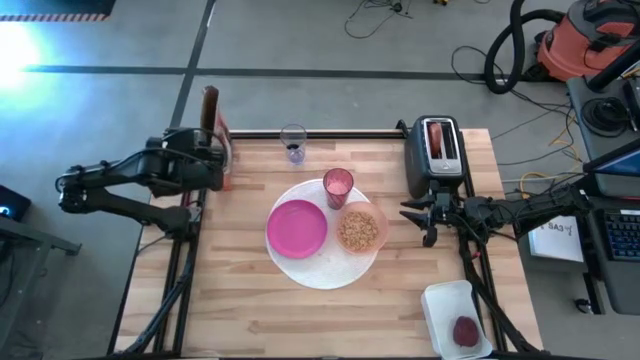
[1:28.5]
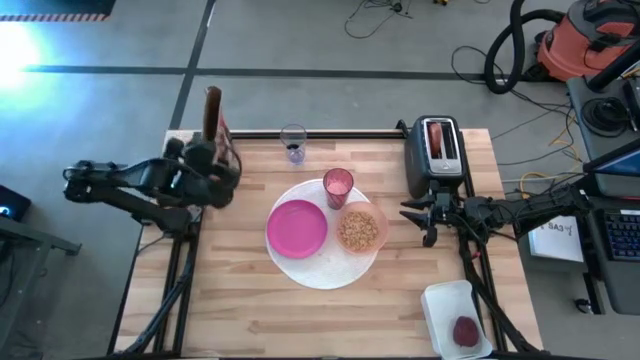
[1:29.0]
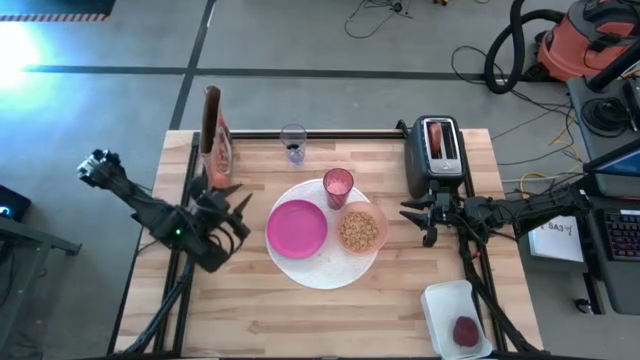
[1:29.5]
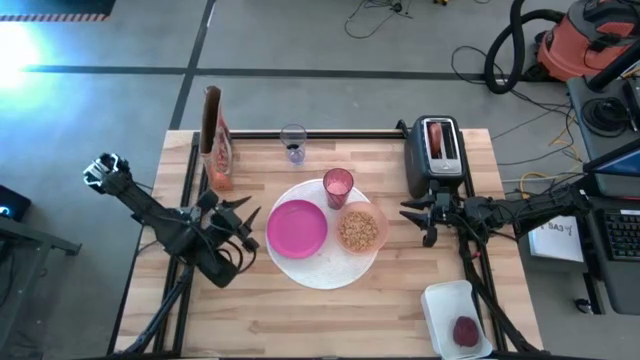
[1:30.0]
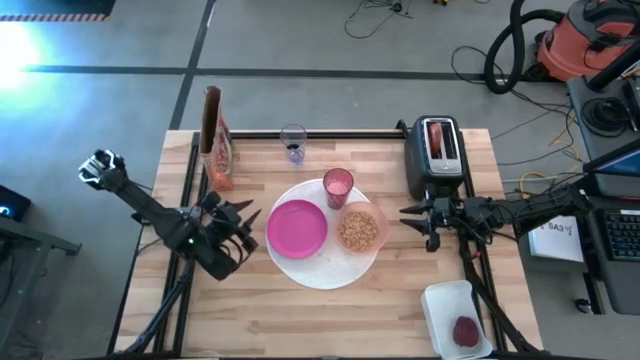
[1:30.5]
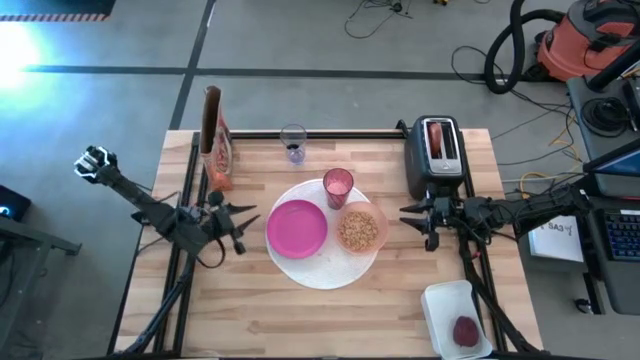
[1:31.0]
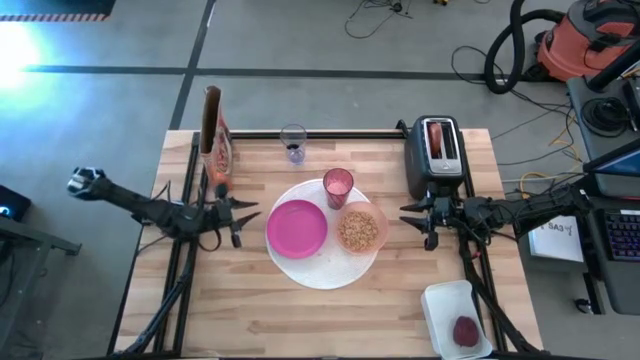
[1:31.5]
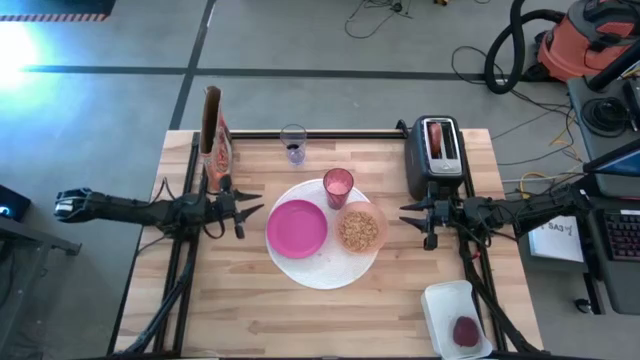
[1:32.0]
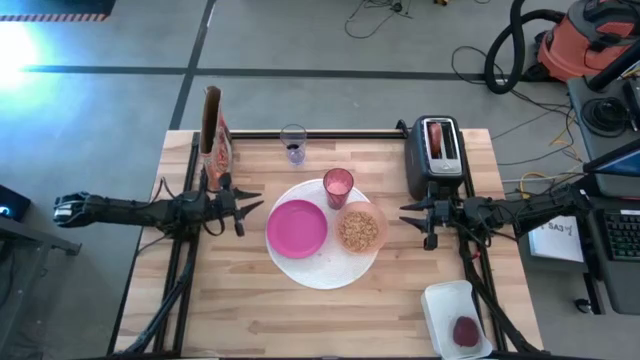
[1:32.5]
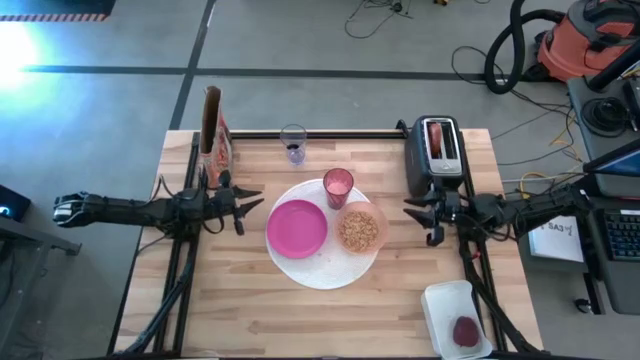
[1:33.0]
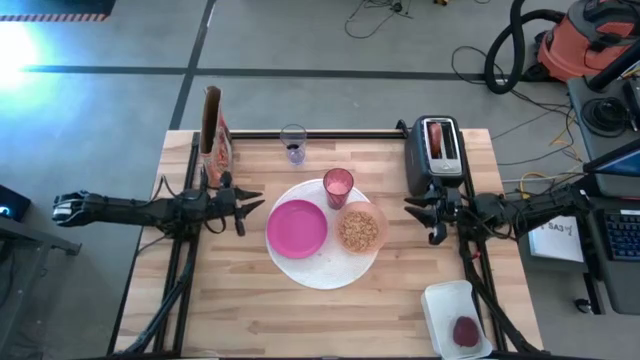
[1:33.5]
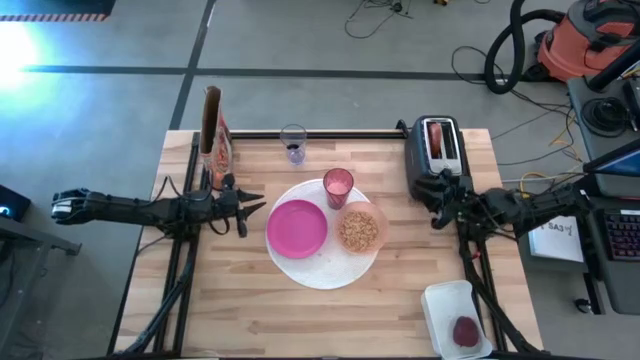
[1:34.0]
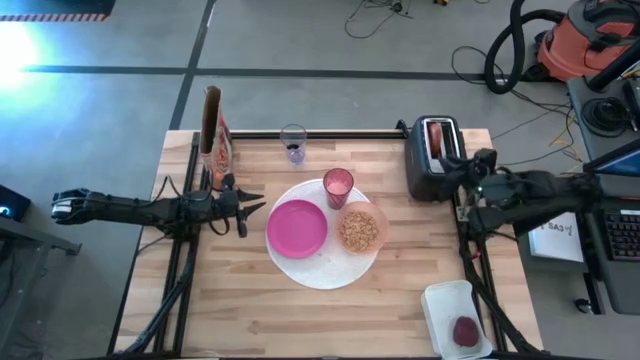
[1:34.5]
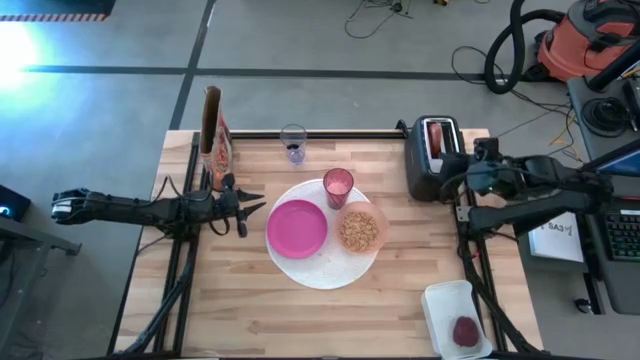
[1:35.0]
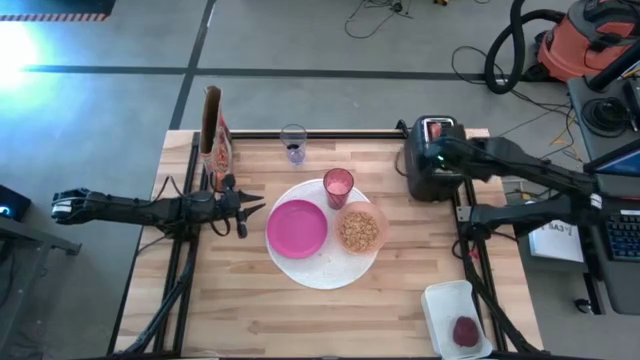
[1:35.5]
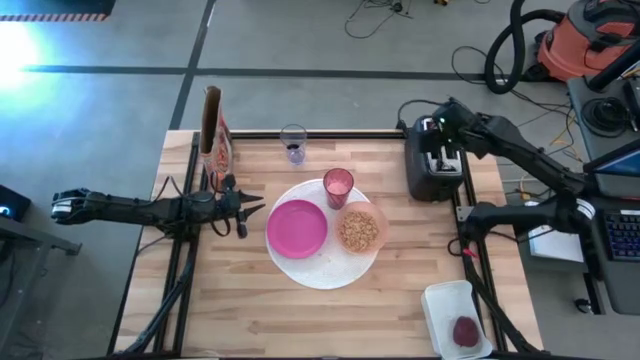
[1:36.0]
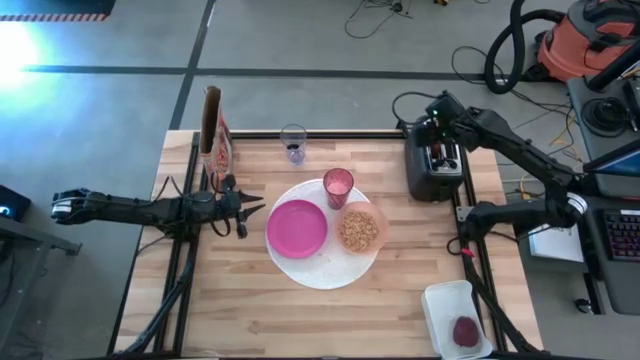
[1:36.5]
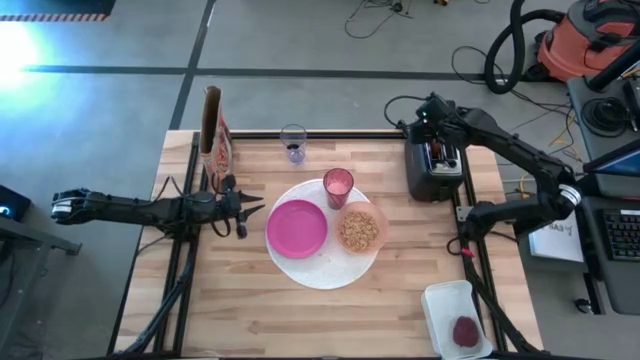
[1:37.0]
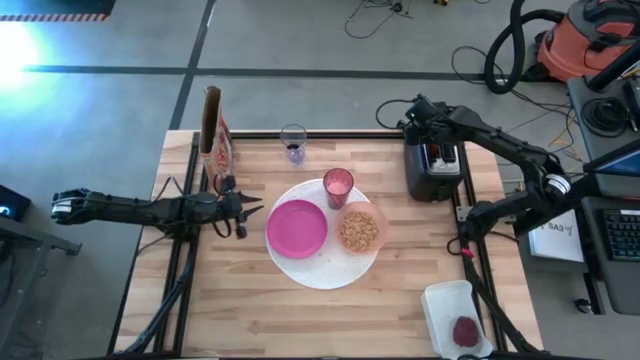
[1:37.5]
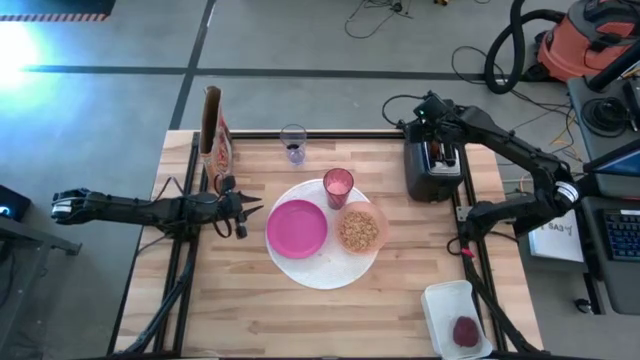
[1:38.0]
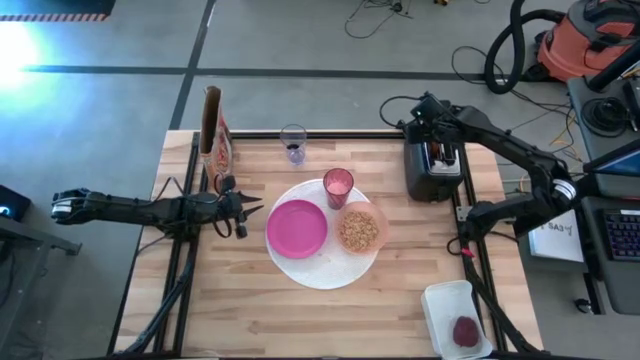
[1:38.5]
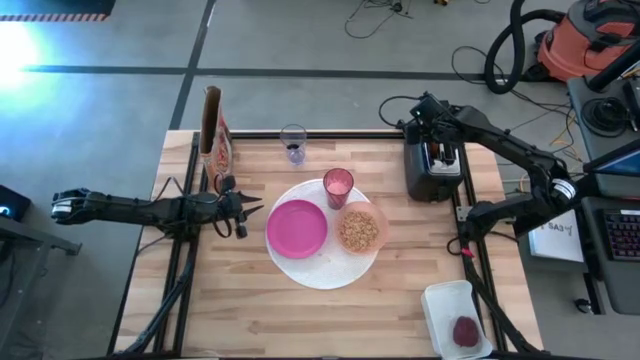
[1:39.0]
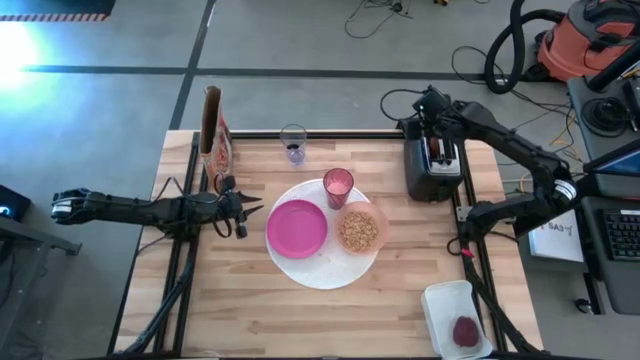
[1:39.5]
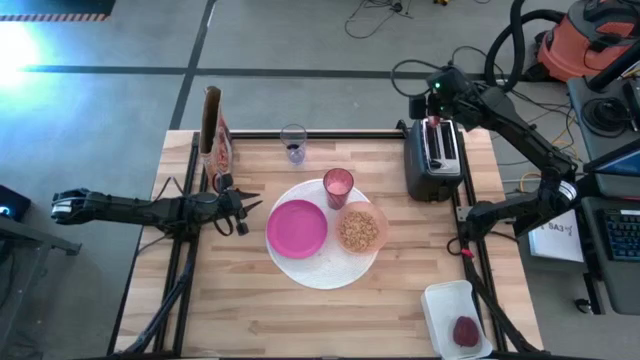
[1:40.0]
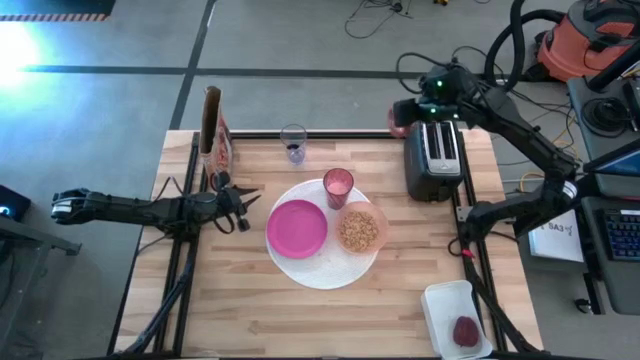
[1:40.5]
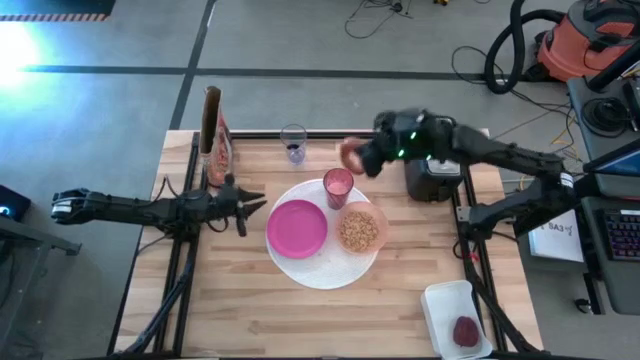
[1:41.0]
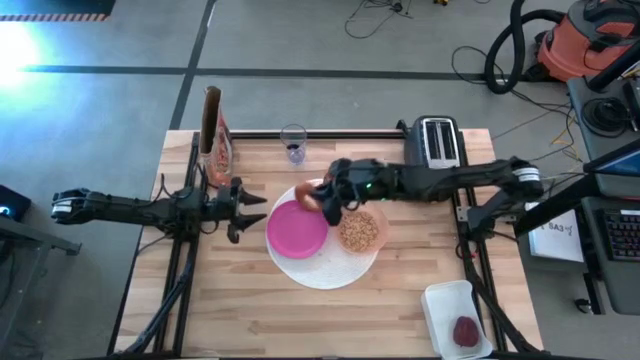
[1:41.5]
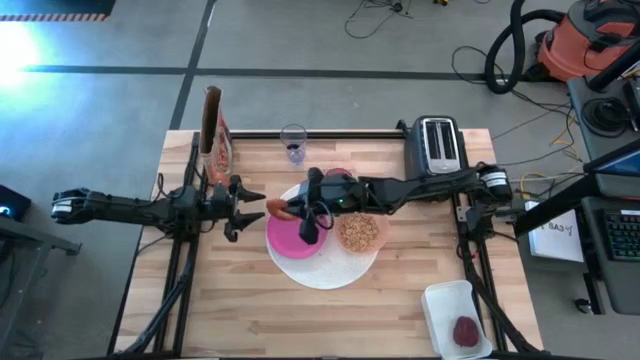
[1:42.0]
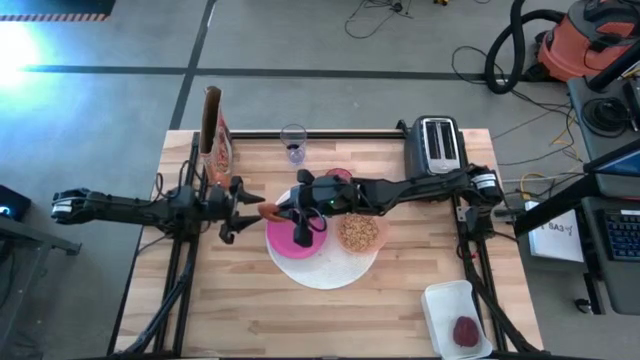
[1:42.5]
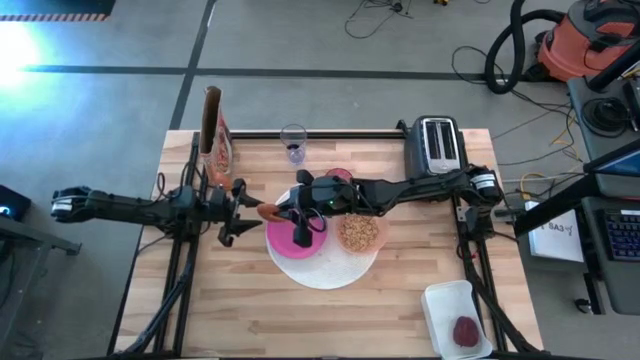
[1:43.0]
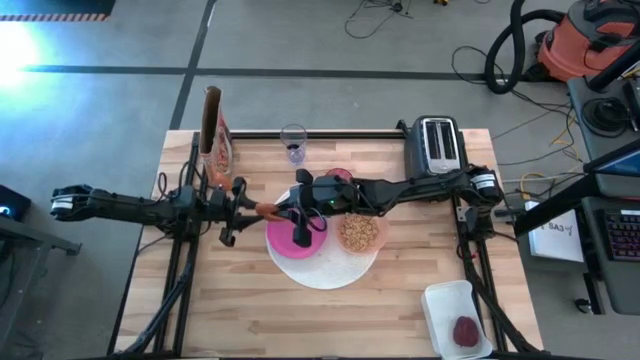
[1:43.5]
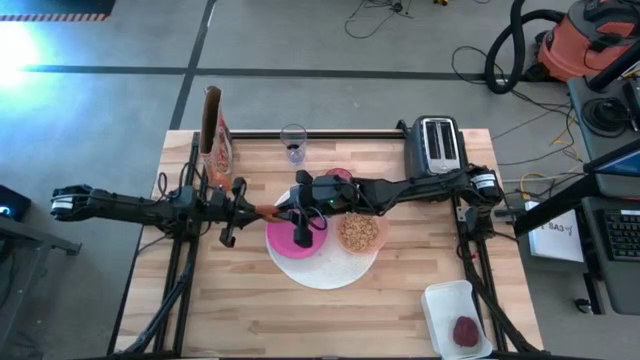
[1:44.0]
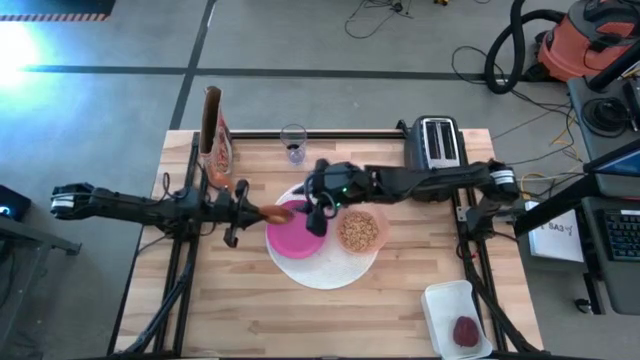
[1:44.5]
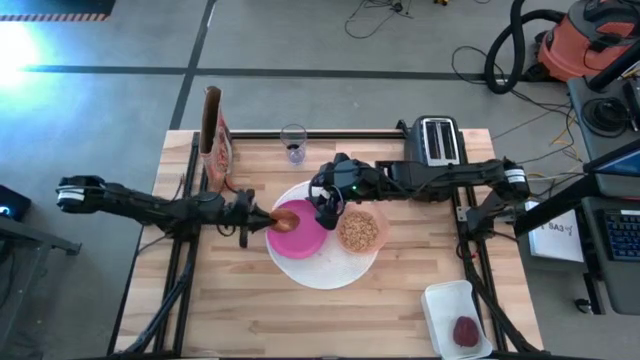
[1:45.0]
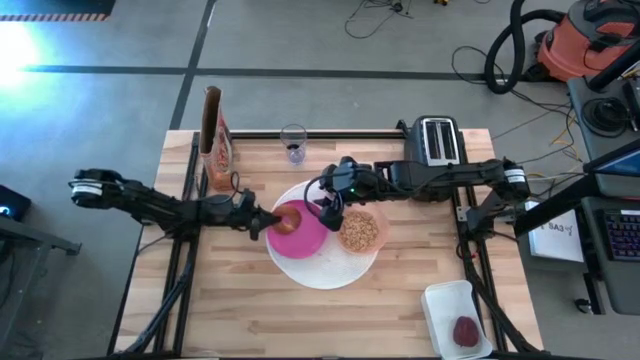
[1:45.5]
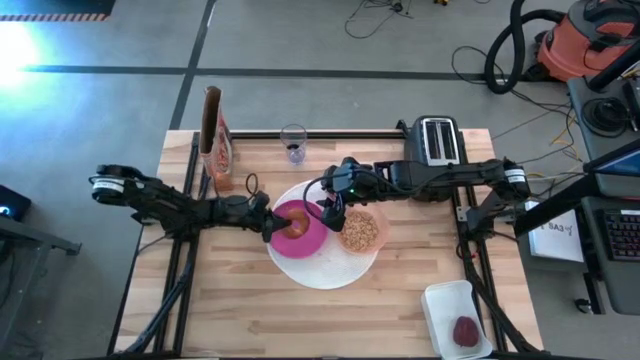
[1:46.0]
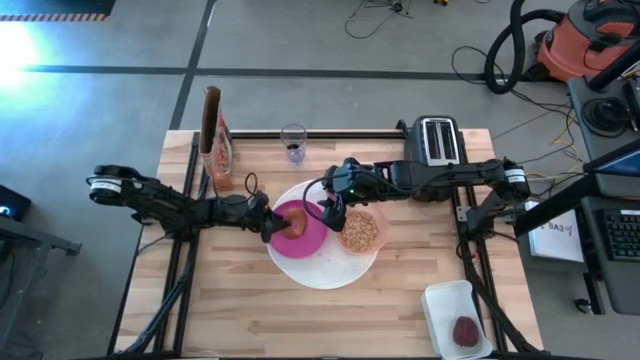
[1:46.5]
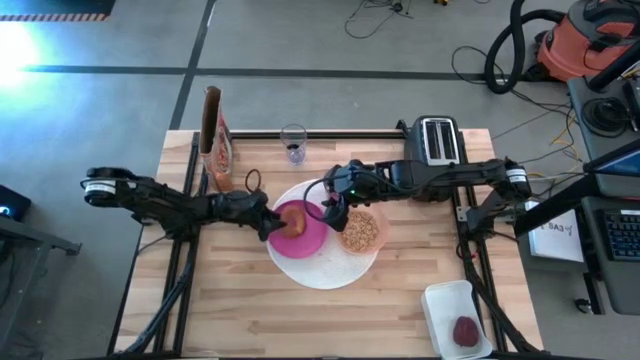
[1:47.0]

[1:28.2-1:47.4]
Task: Arrange a breakfast setting
Put the toasted bagel on the pink plate from the toaster

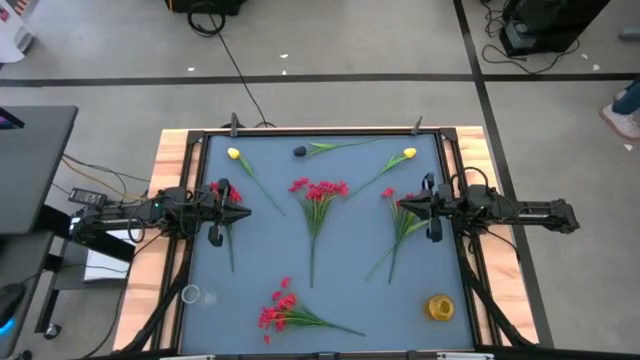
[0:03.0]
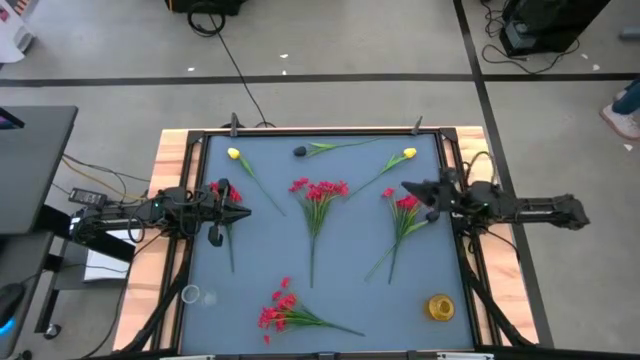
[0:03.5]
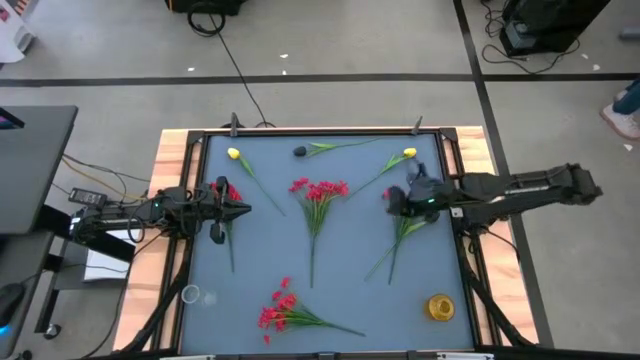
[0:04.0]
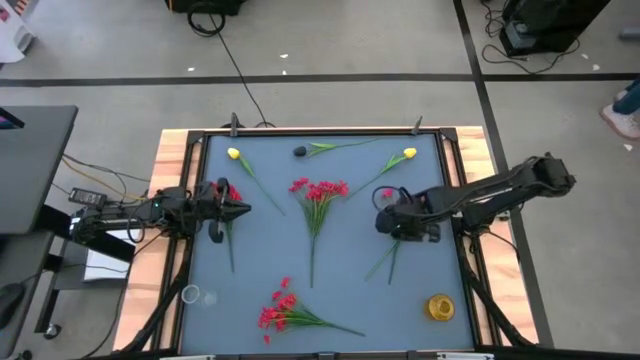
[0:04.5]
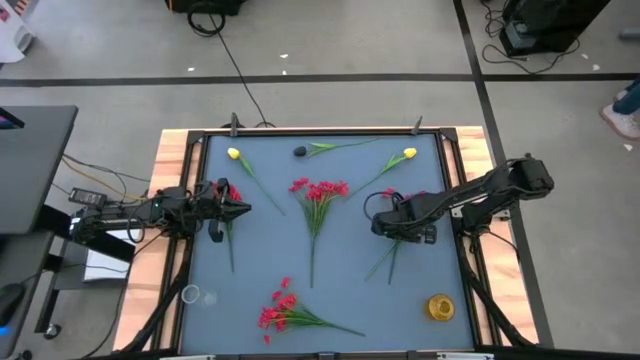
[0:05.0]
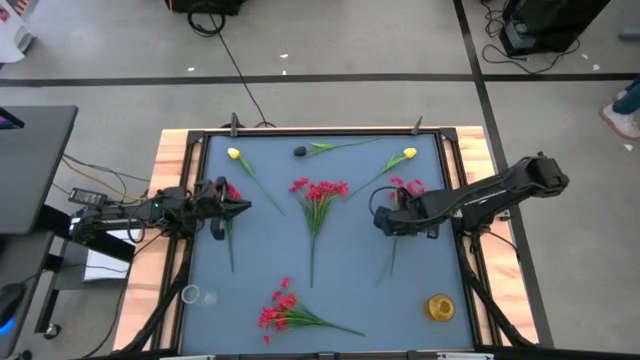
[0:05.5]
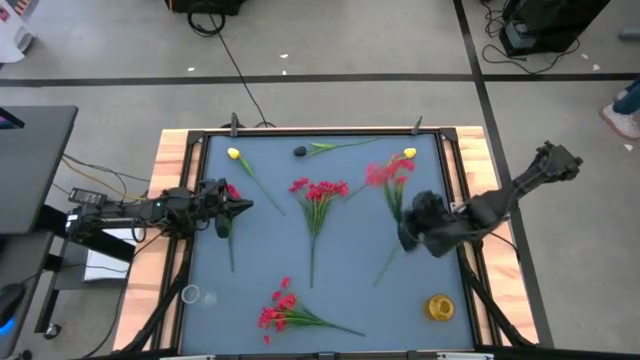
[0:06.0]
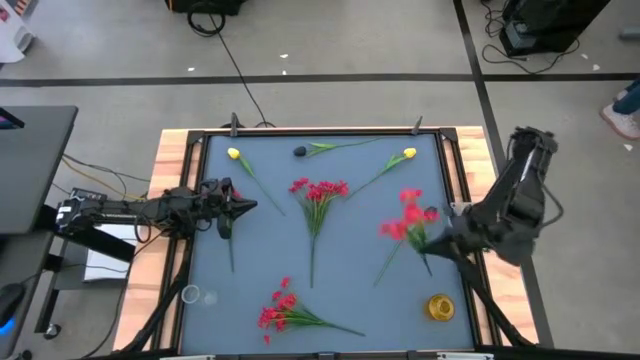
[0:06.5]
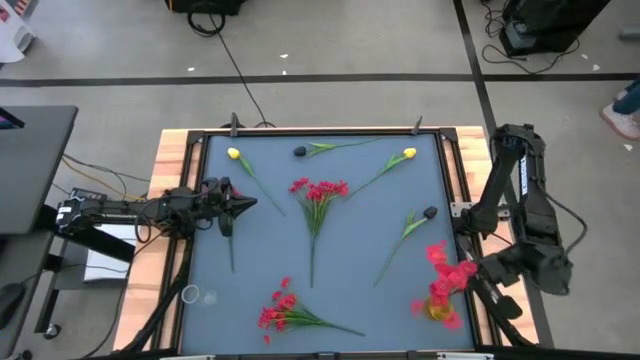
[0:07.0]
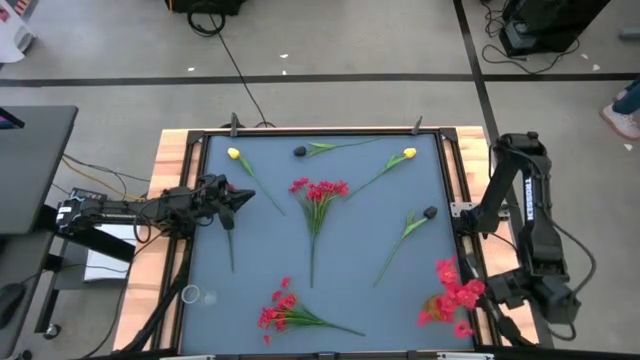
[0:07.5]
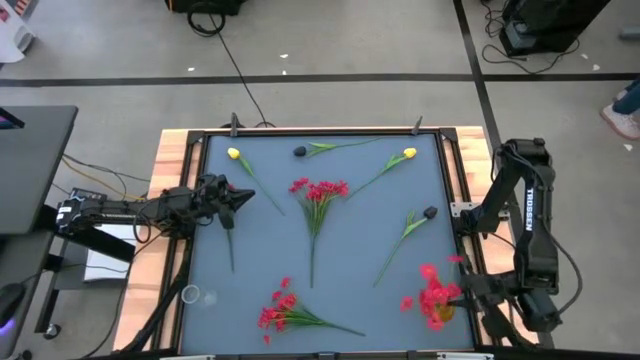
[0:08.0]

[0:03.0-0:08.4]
Task: Sort flowers into vase by color
Put the top right red flowers into the yellow vase
